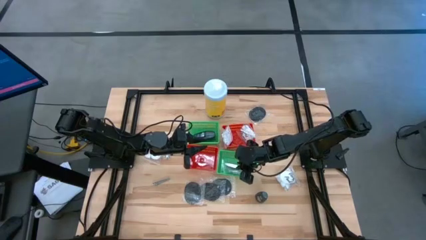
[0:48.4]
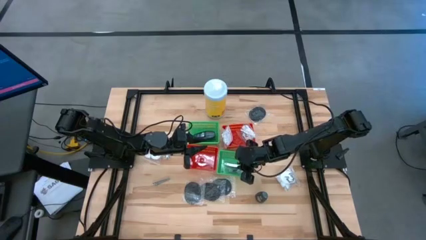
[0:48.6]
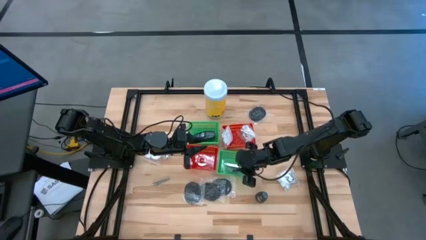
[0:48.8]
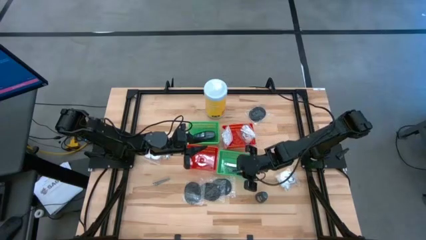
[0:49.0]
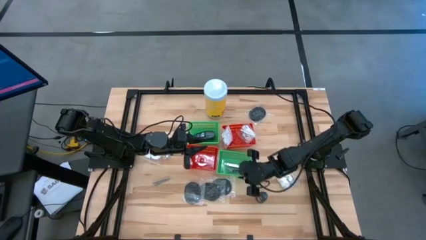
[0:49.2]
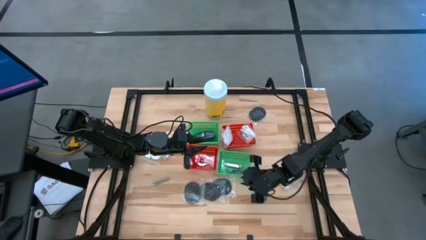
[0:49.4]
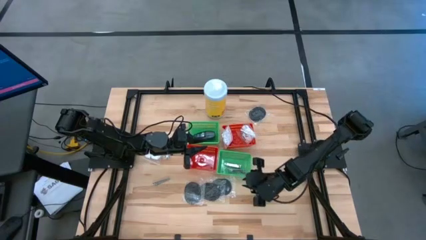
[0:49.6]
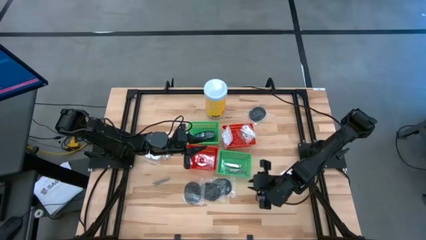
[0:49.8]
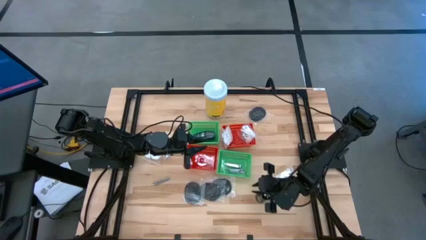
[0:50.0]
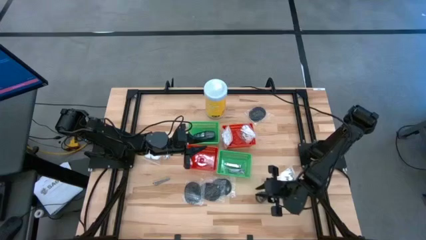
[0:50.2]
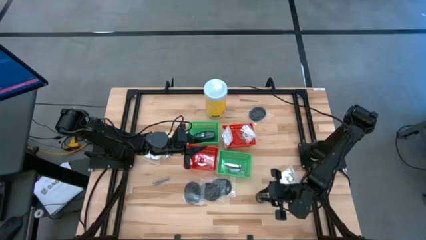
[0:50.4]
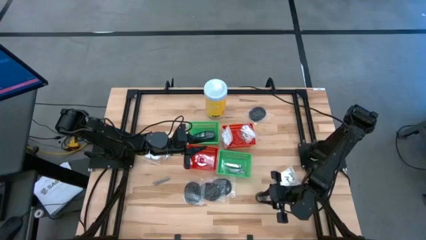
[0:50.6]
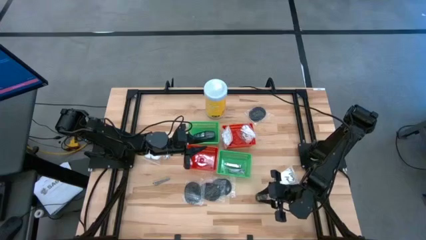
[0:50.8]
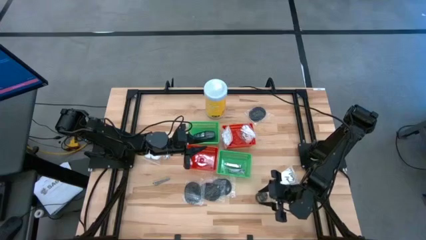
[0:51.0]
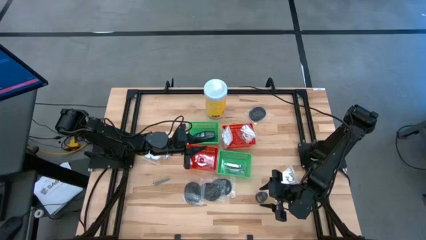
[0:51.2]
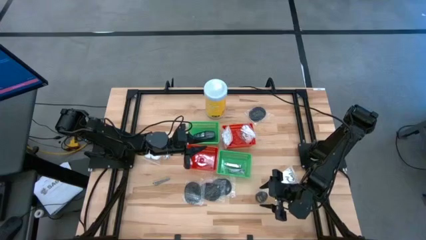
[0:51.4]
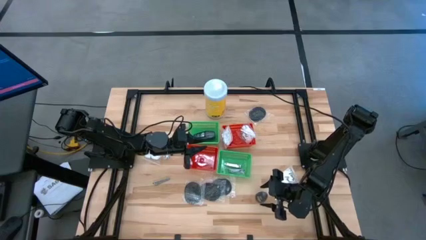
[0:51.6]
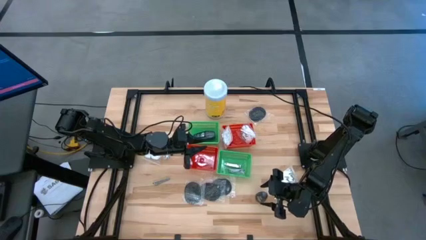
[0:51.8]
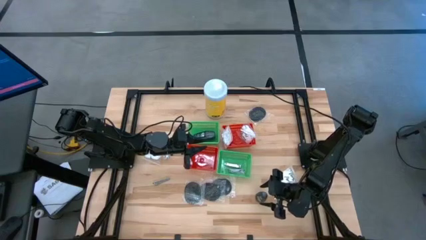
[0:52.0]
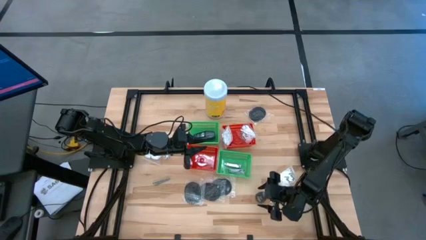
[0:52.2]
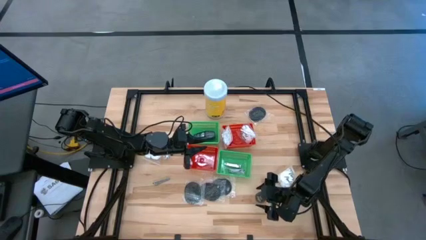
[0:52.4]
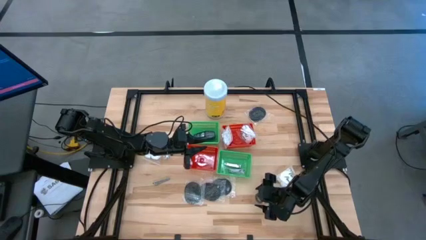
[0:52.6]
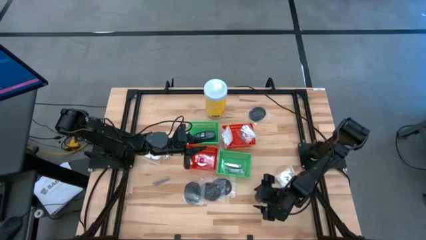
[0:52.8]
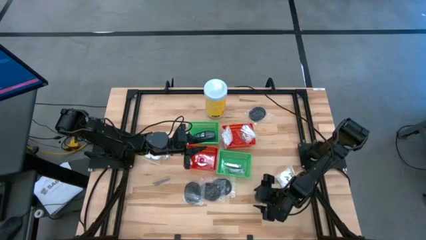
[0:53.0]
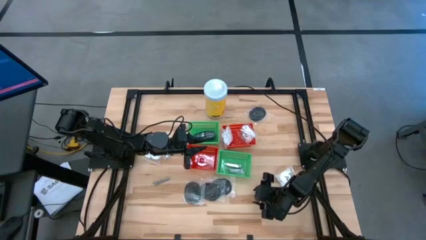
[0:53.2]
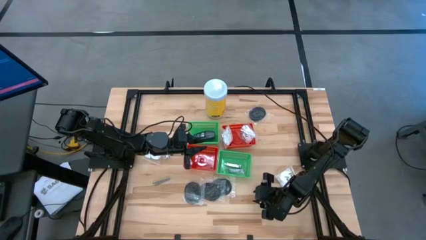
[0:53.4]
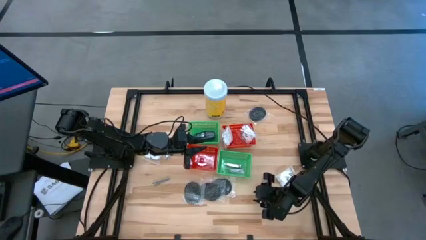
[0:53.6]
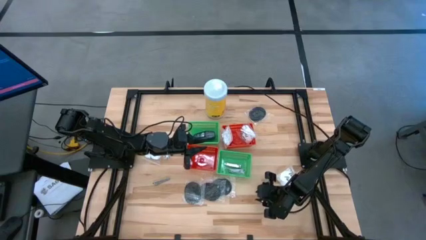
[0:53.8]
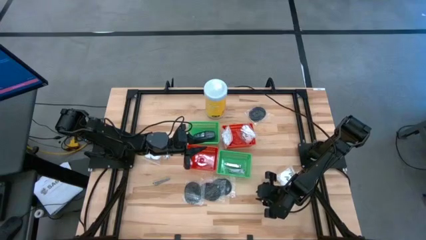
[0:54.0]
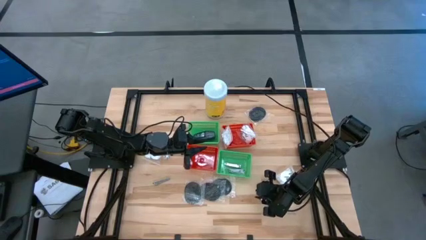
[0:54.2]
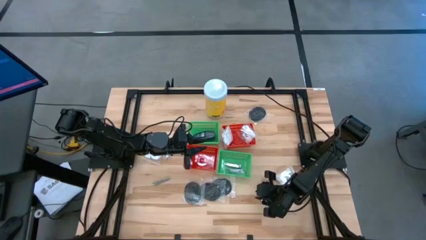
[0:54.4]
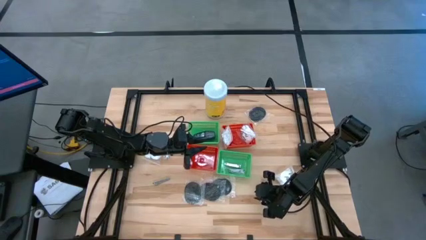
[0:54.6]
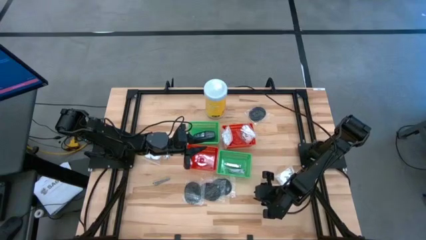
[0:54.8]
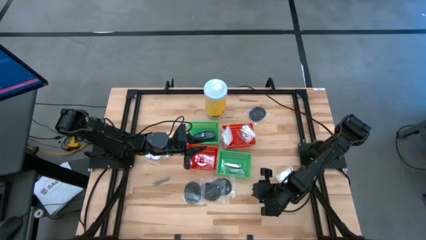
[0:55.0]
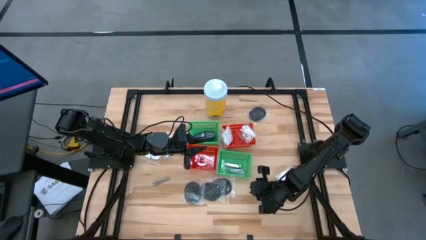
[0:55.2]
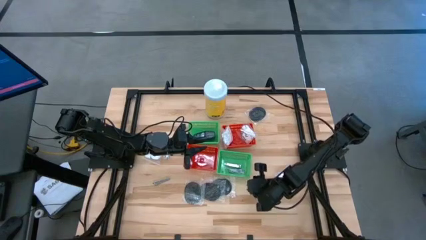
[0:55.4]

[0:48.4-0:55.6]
Task: Pick & Place Travel size toiletries
Put the deodorant into the right green bin

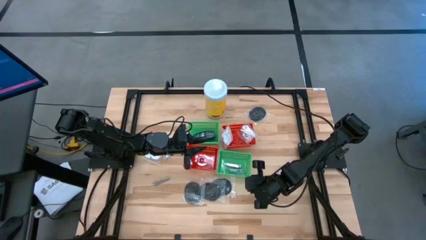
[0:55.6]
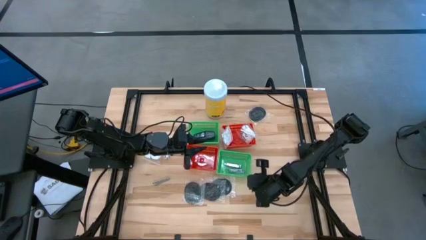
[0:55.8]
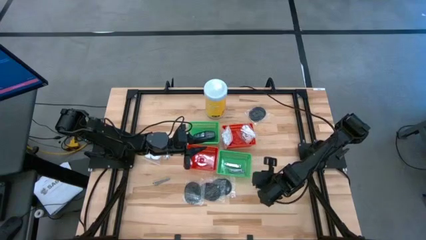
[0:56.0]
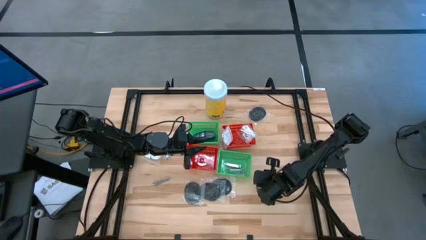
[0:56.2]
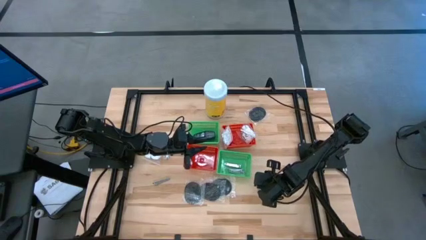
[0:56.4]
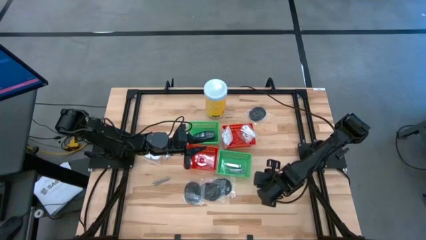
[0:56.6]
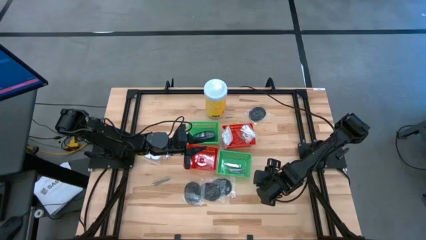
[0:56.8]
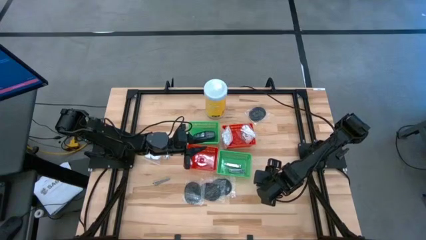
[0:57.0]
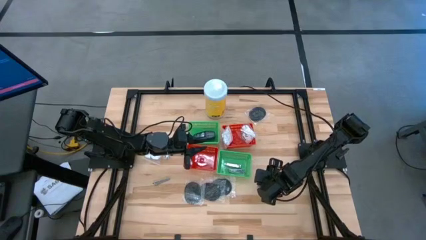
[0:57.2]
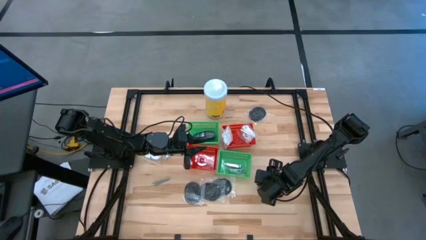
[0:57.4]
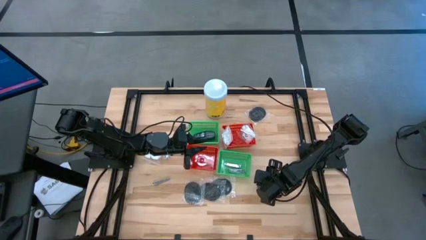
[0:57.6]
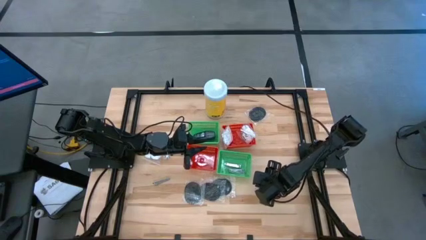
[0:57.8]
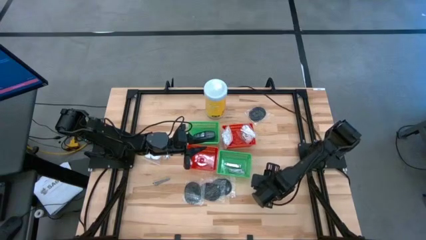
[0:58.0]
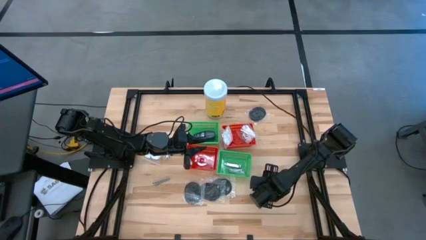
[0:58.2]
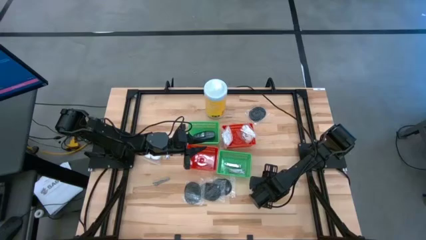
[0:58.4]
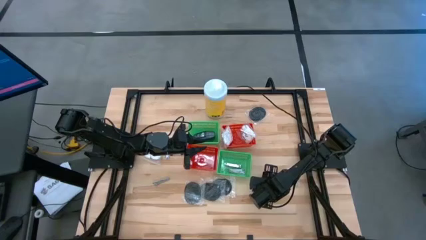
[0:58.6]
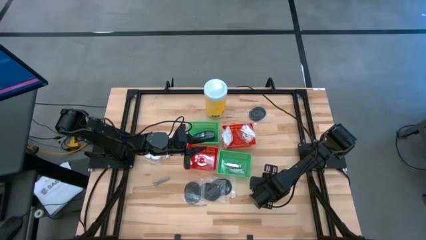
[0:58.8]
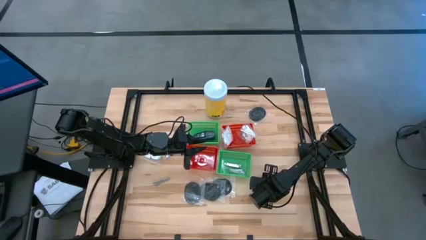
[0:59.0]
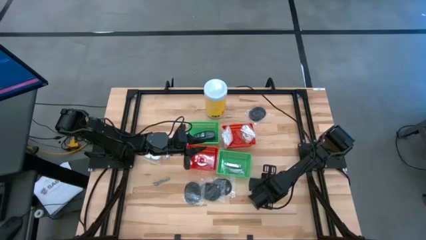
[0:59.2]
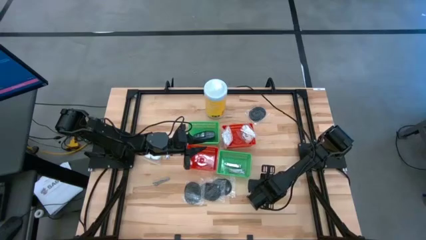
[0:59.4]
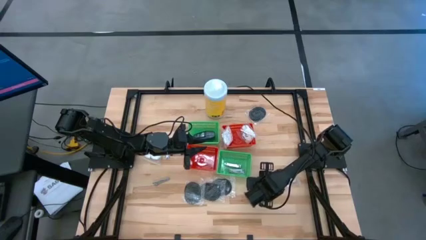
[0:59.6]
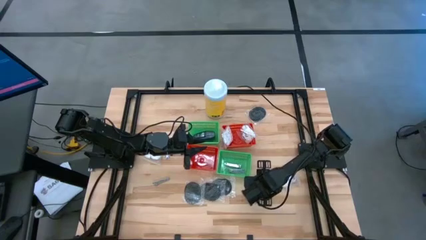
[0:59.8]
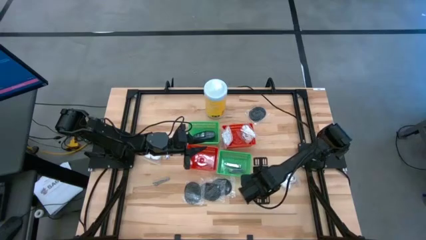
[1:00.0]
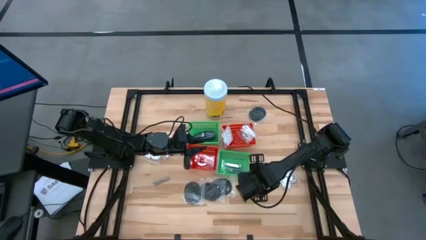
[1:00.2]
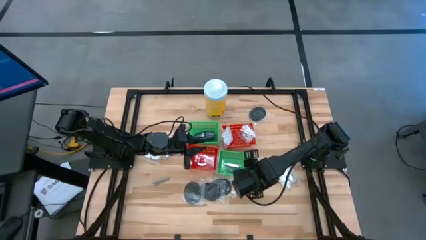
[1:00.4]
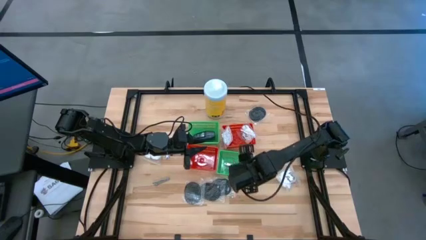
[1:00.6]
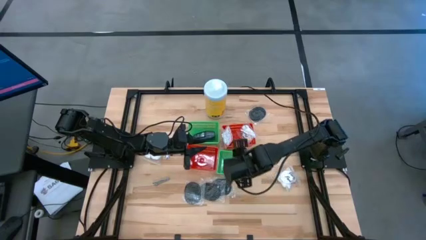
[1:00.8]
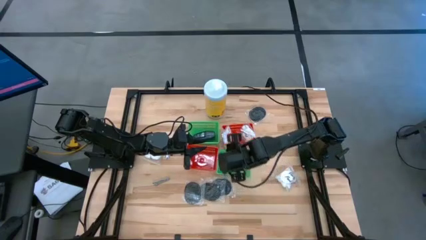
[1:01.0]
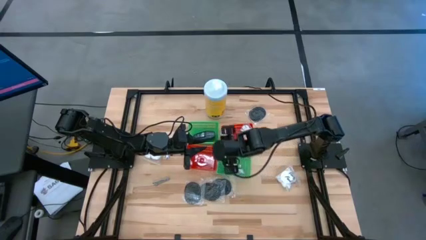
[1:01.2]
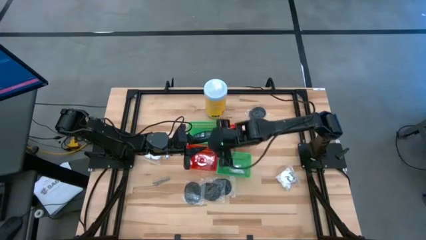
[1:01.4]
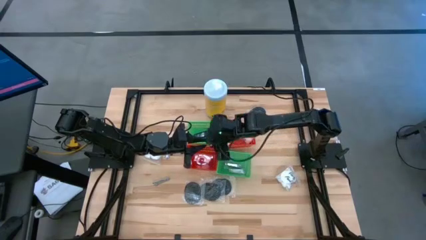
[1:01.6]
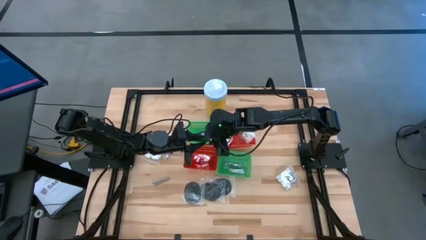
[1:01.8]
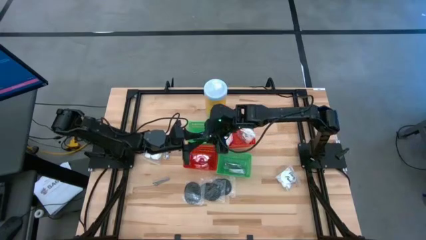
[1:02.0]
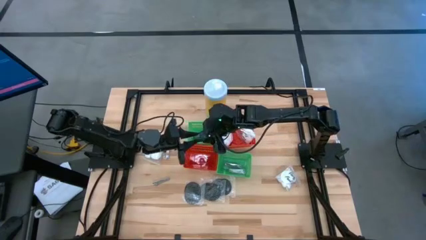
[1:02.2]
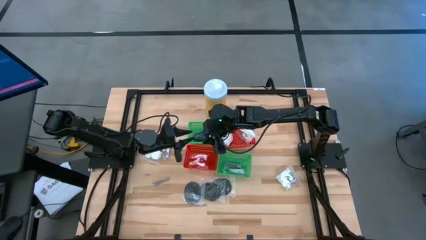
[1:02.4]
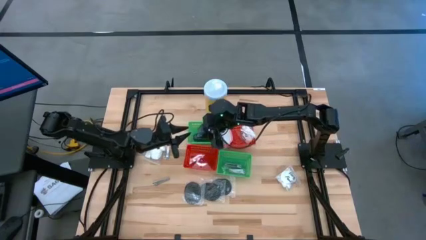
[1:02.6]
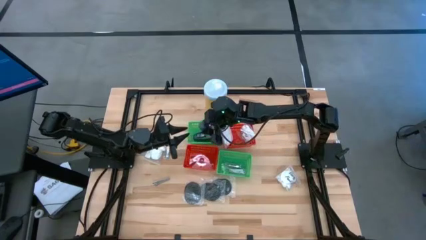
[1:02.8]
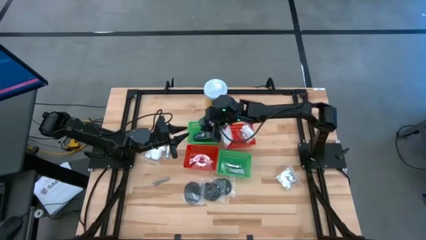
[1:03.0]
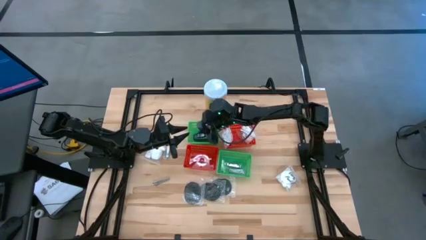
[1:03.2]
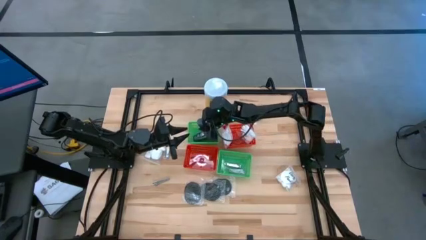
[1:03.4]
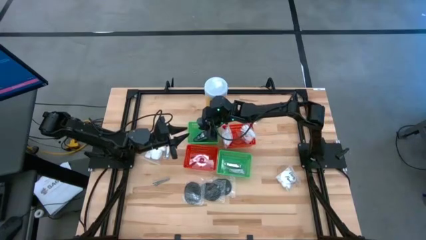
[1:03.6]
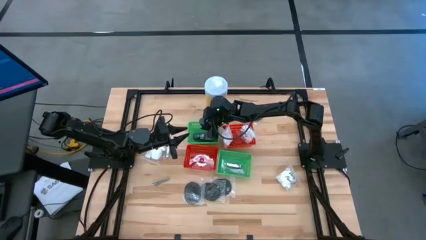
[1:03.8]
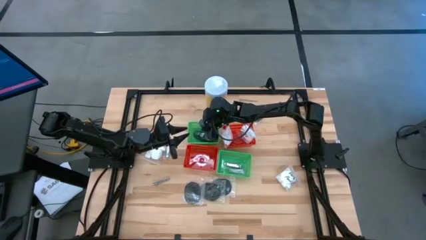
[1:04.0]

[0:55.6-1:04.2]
Put the deodorant into the right green bin
